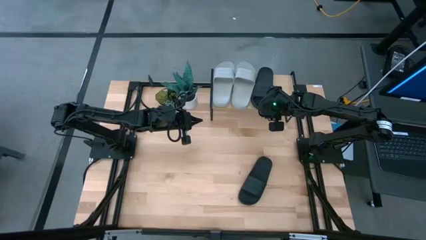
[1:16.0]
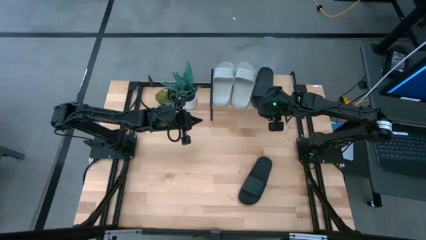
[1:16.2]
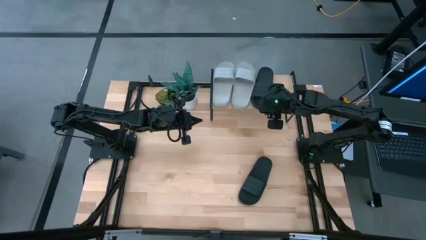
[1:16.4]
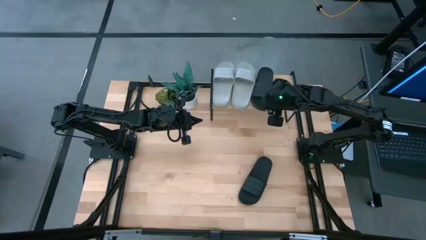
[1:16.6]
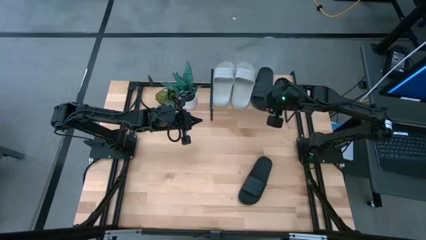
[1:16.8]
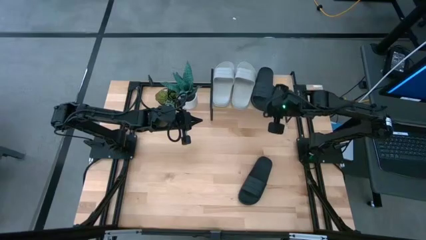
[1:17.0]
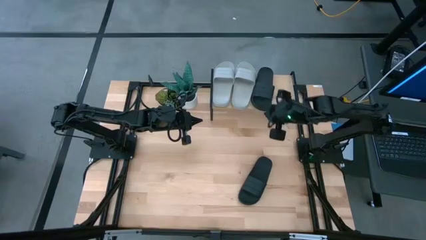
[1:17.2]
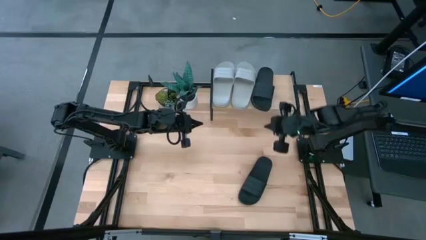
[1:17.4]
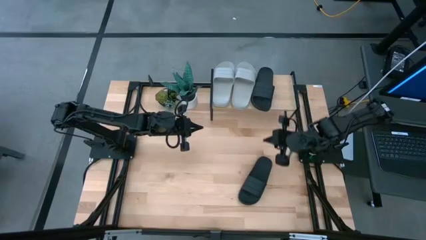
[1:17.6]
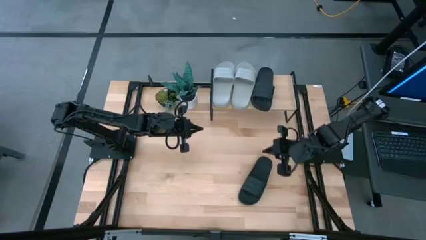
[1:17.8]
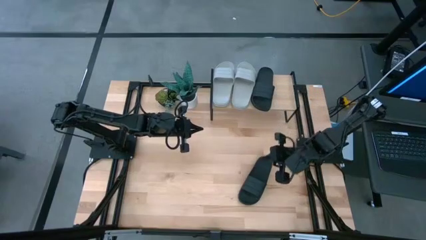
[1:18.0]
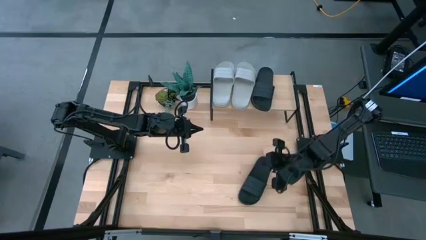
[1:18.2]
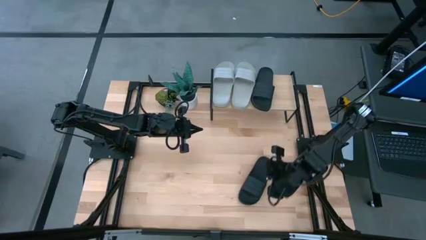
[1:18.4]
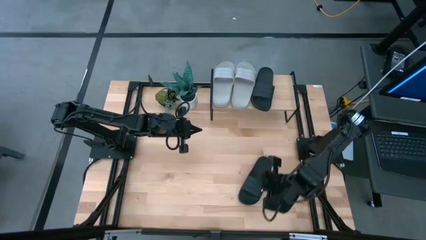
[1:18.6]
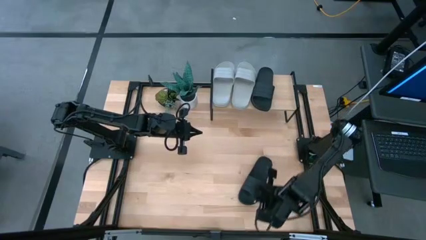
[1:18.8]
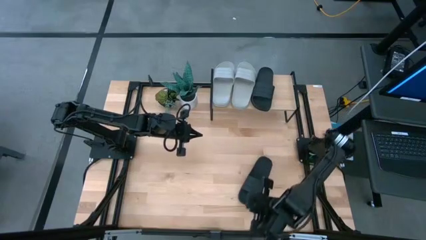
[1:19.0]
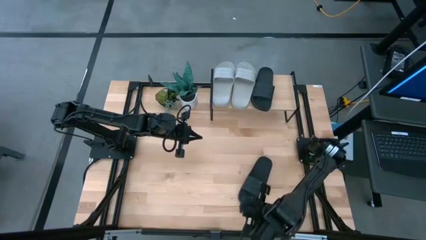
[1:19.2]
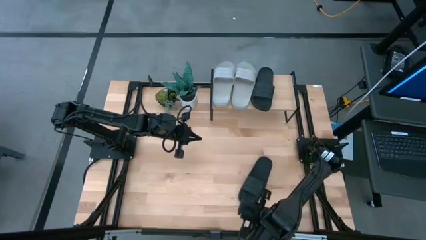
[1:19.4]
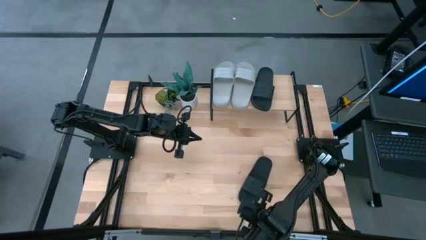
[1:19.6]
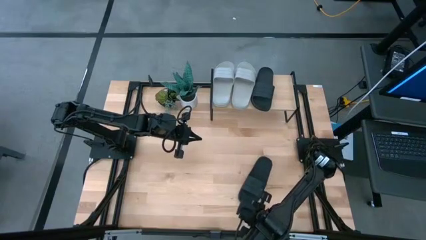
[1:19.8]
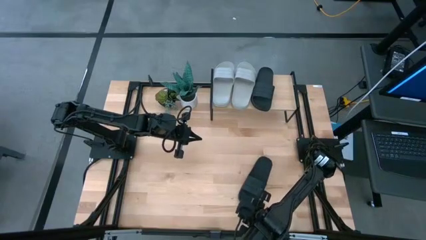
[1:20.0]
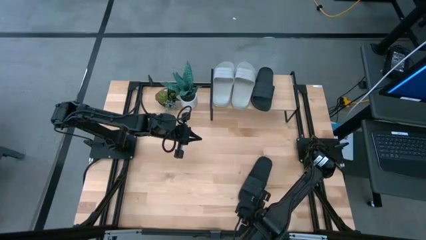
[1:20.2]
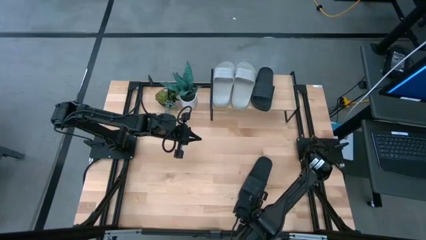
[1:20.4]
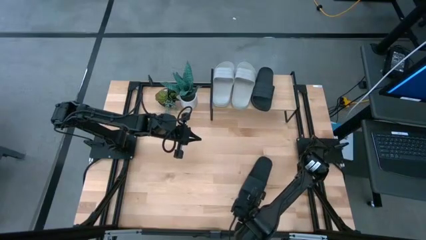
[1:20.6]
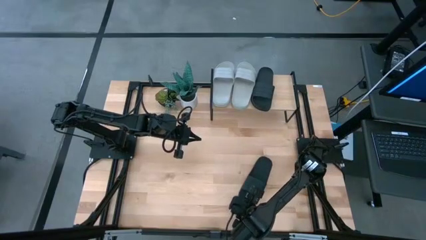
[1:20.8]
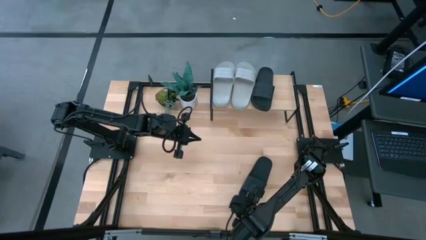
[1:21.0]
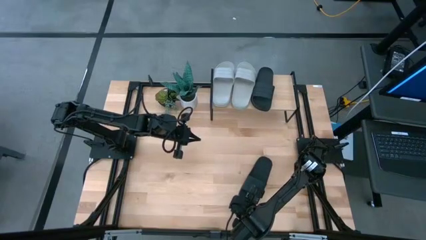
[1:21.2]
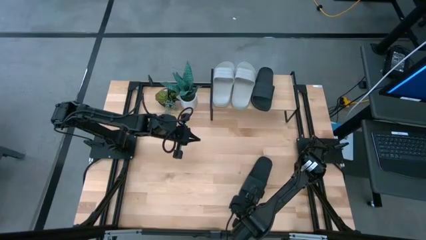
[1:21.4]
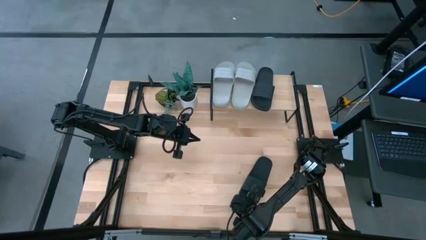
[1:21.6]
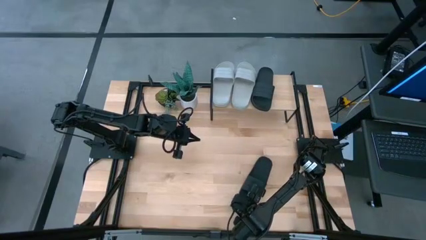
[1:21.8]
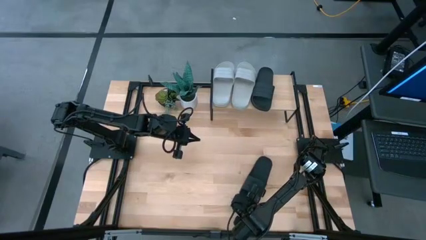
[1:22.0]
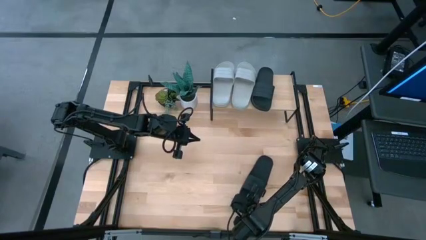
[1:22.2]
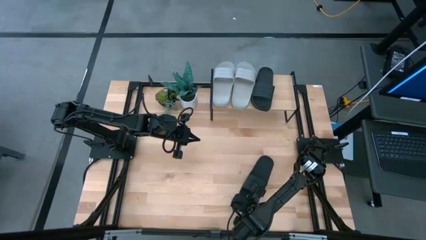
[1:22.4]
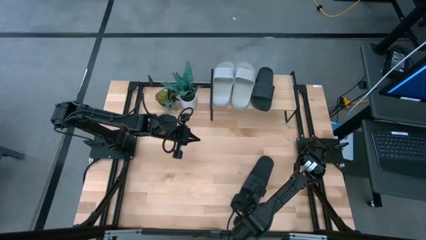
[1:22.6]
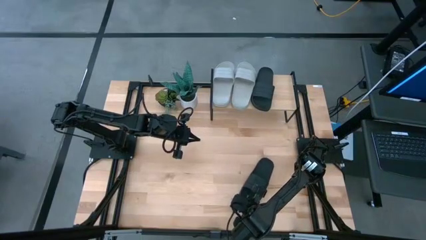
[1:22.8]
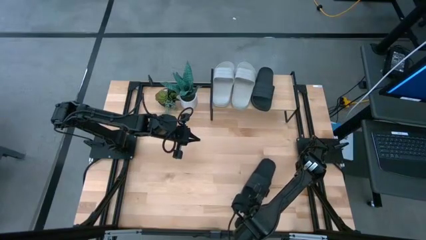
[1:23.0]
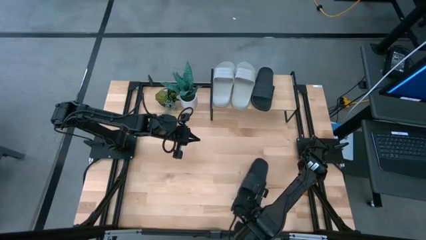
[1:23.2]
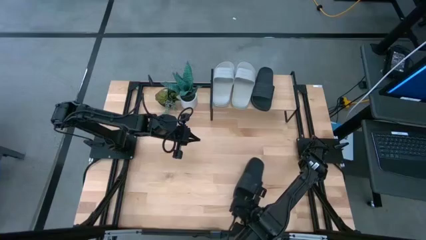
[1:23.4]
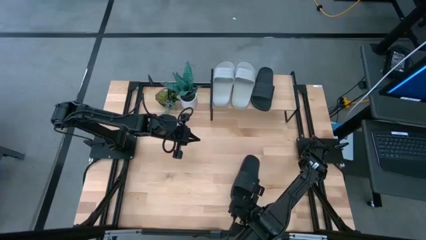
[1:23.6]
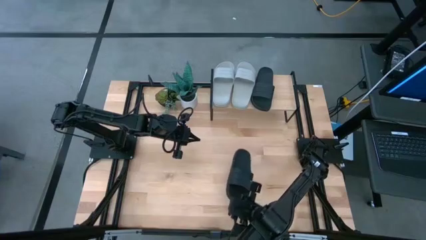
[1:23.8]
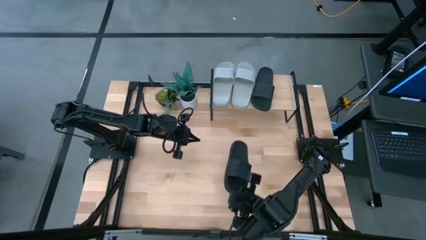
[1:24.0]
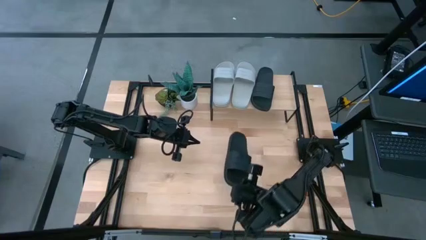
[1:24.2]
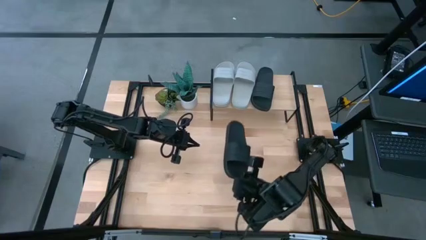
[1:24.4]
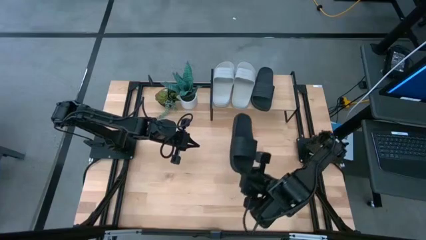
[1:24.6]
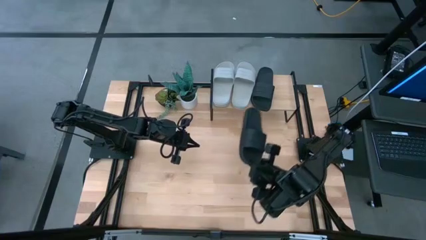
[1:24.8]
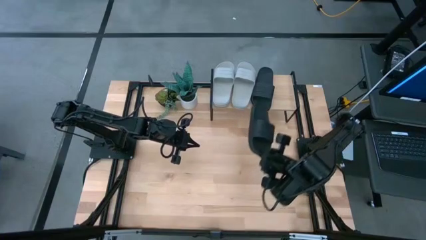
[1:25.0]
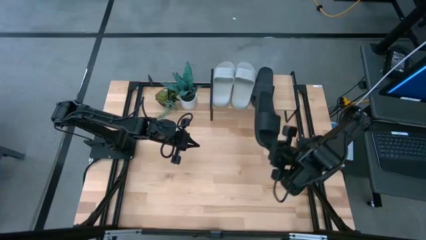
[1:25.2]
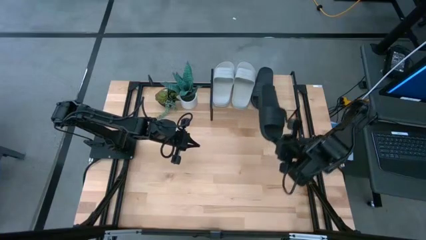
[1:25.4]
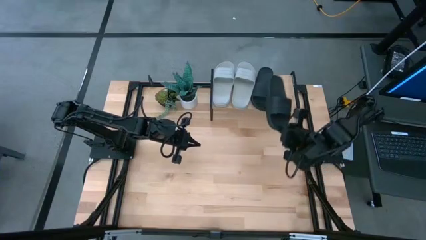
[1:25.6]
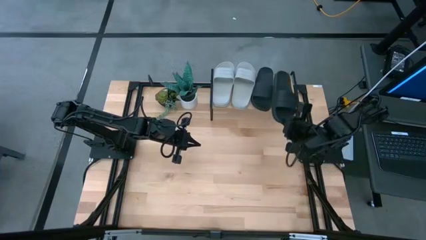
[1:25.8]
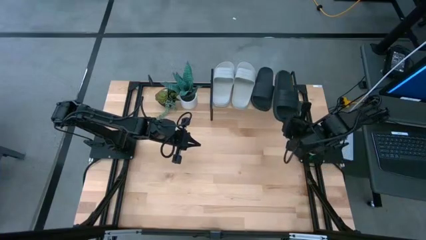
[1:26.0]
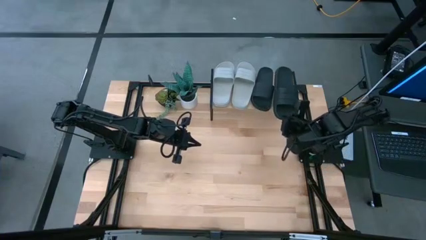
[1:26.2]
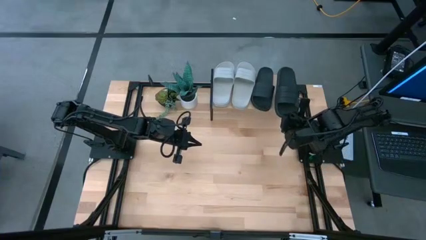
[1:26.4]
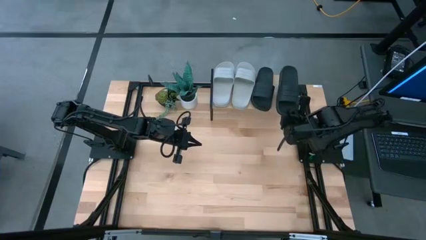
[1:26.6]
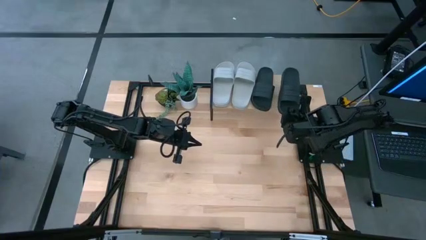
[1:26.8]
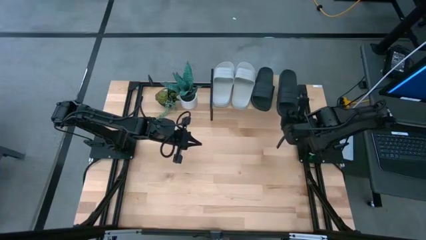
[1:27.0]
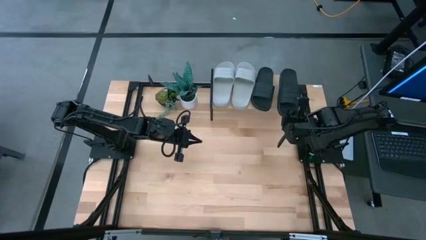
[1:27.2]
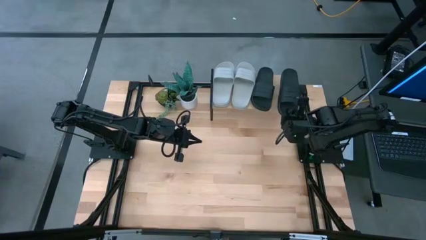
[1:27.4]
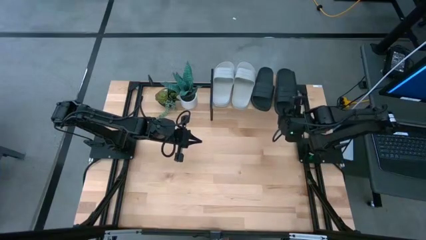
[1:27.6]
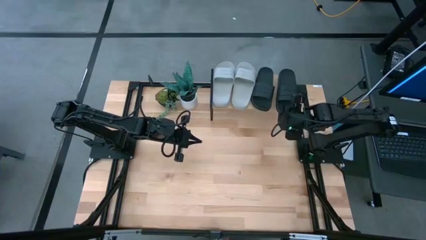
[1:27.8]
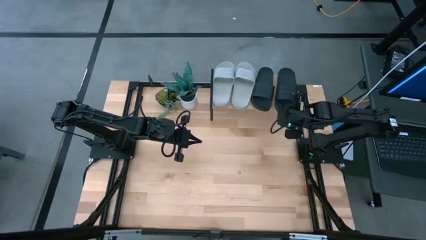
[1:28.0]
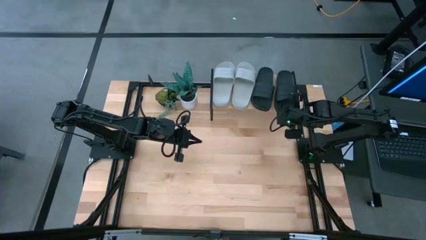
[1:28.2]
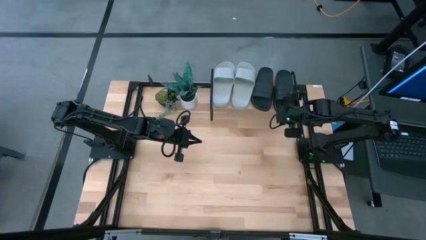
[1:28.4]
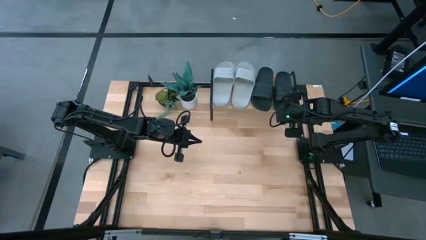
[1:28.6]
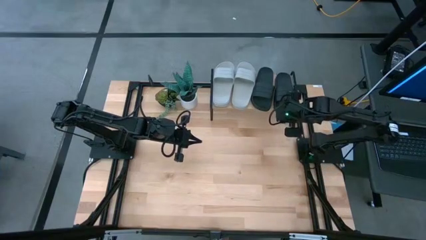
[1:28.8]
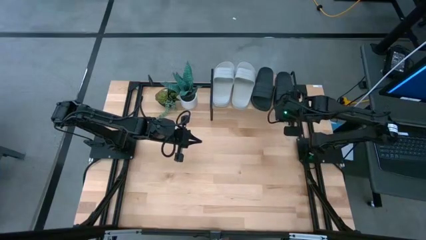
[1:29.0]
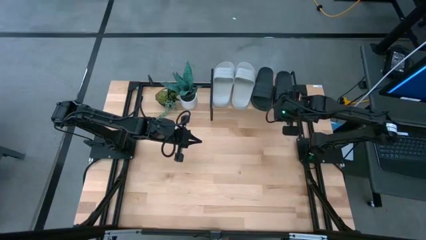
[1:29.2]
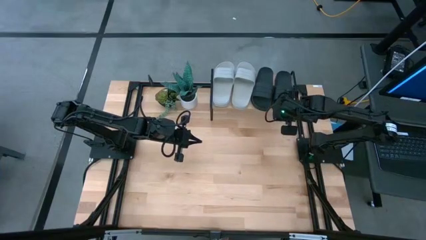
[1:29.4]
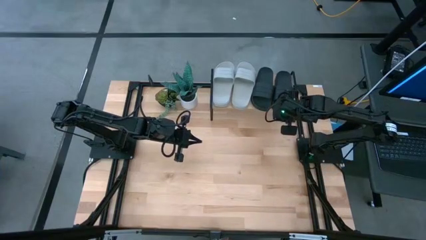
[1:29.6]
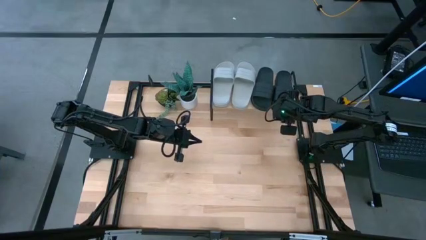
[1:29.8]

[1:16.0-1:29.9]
Task: Pick and place slides into the shelf
Put the black slipper on the shelf

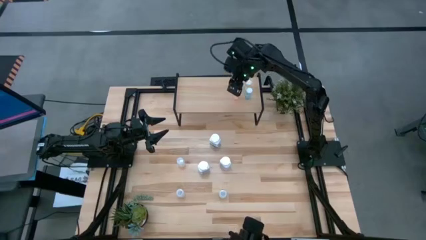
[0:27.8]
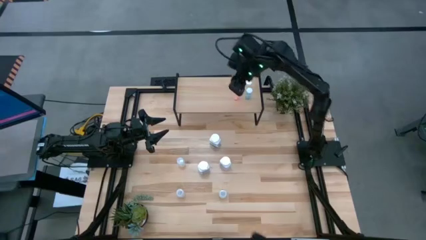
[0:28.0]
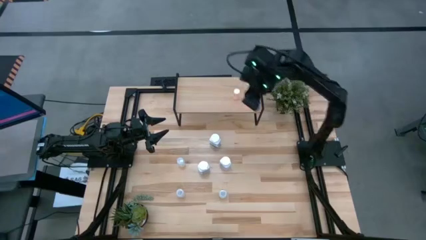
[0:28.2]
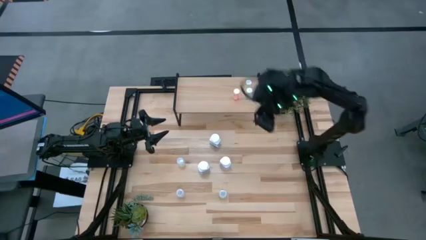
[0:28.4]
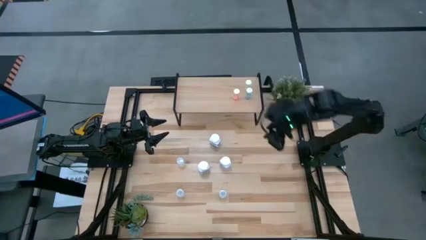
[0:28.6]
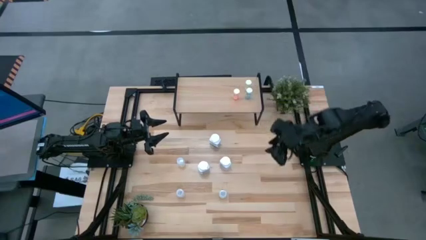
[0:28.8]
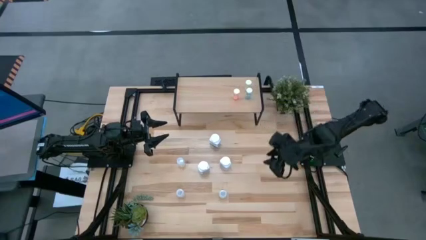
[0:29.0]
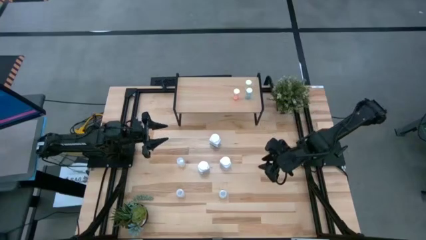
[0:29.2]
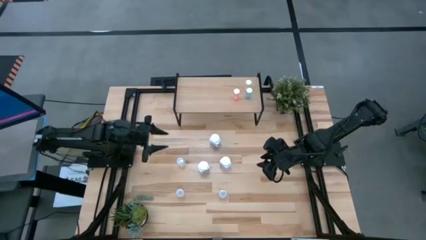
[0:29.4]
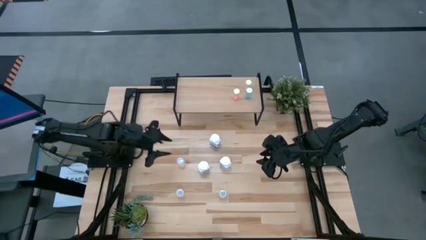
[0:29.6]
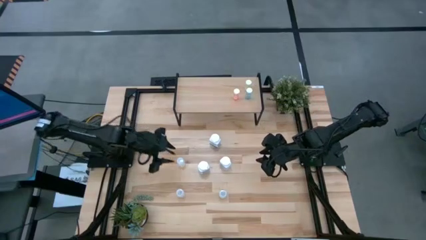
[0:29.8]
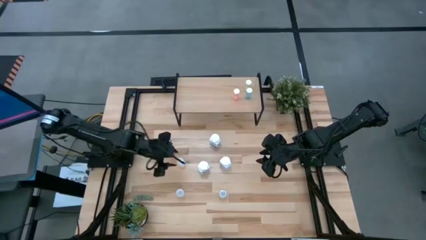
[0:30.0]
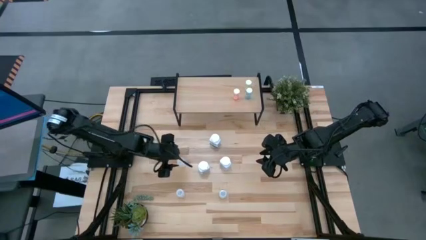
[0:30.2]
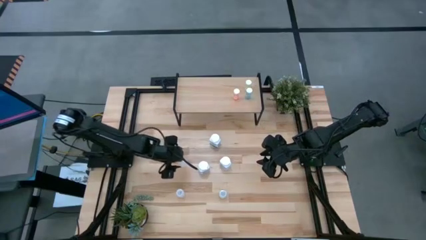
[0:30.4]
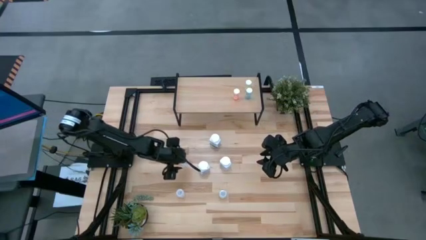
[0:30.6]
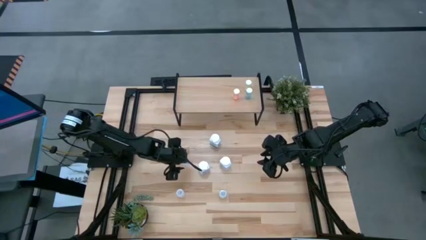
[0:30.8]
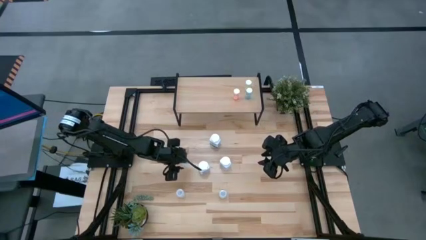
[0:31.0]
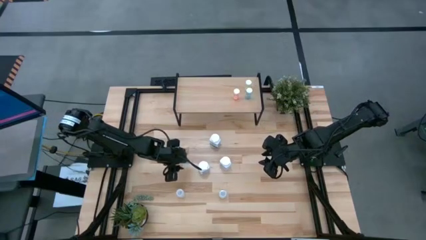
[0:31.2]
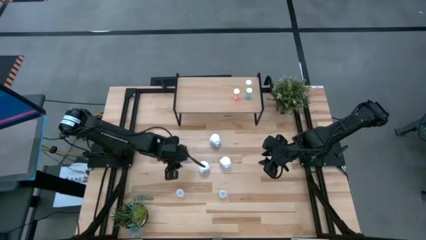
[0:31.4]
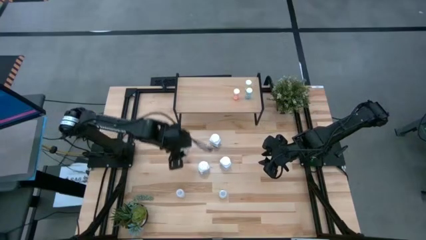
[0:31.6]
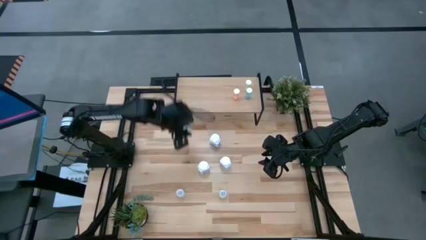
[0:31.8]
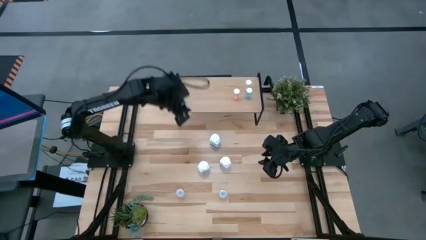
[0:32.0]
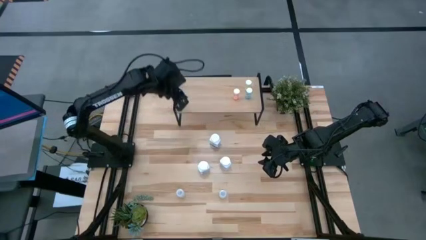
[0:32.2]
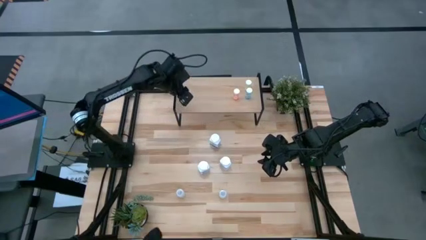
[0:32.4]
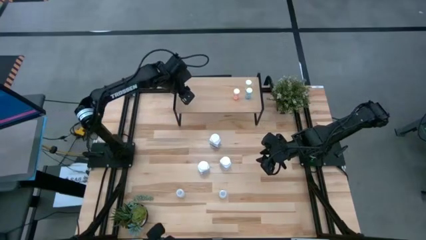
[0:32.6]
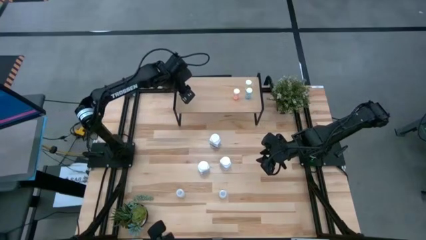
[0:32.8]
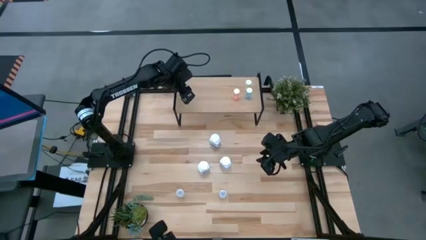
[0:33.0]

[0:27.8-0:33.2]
Task: Pick and place medicine bottles onto shelf by color
Put the top left transparent medicine bottle on the shelf
